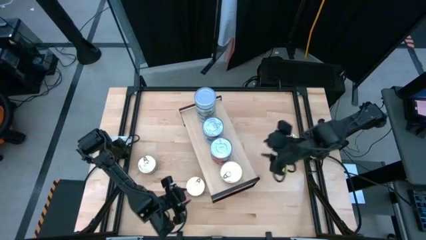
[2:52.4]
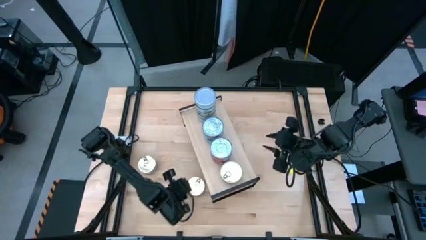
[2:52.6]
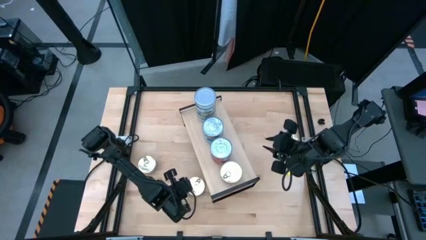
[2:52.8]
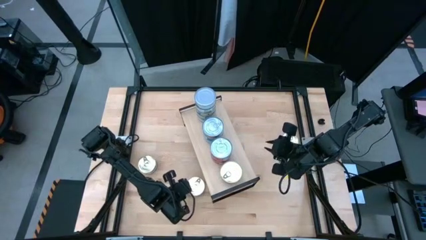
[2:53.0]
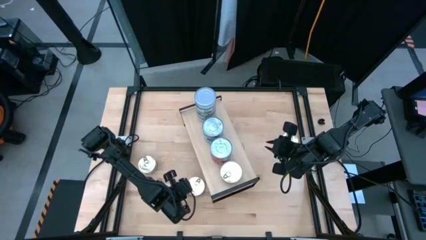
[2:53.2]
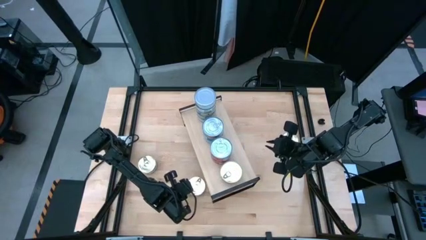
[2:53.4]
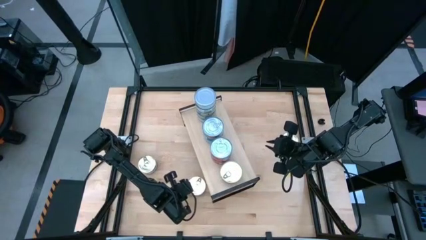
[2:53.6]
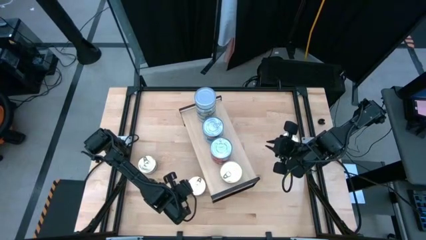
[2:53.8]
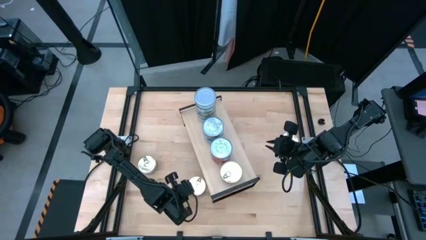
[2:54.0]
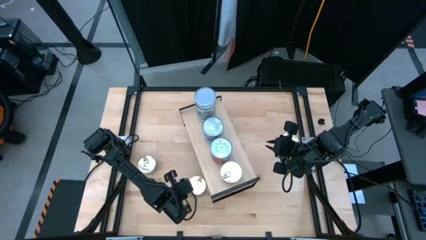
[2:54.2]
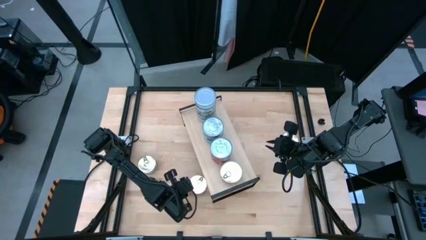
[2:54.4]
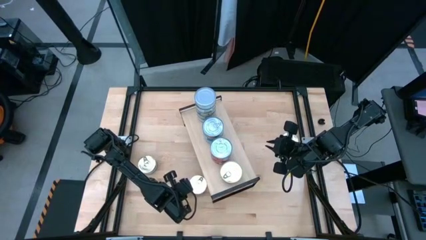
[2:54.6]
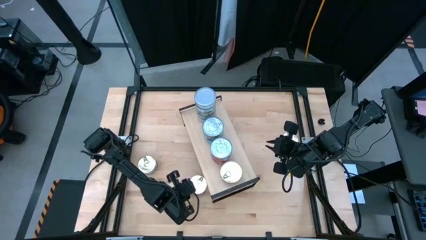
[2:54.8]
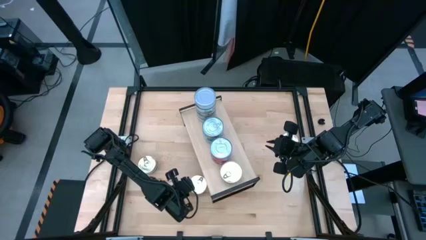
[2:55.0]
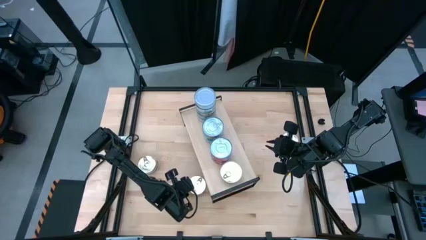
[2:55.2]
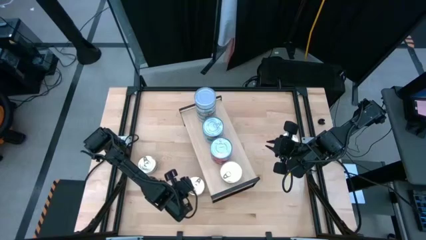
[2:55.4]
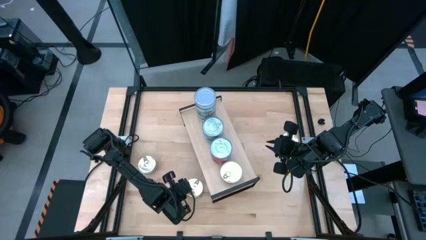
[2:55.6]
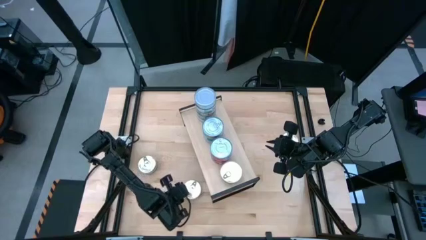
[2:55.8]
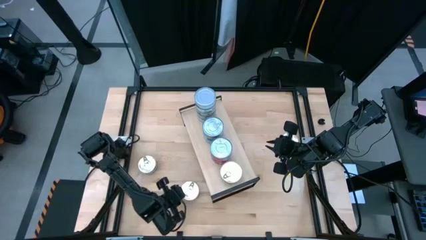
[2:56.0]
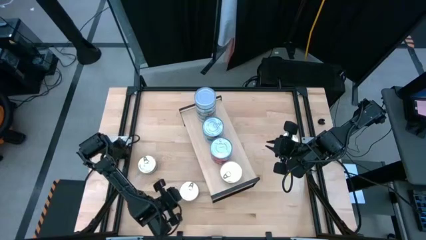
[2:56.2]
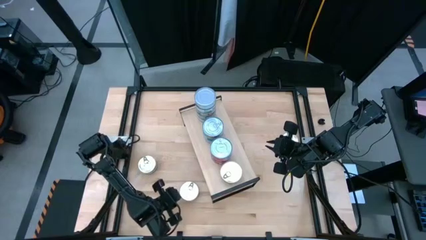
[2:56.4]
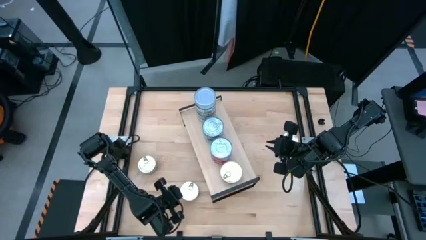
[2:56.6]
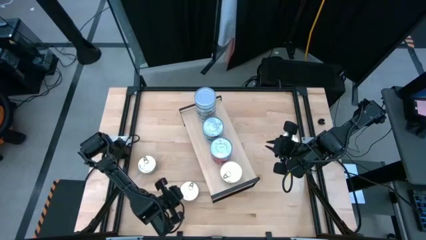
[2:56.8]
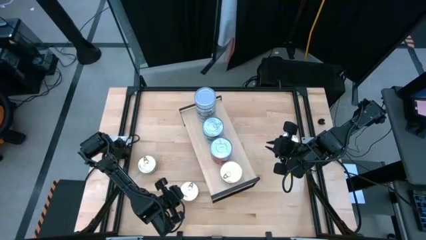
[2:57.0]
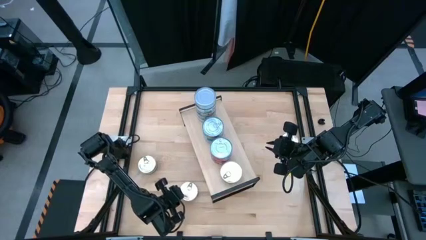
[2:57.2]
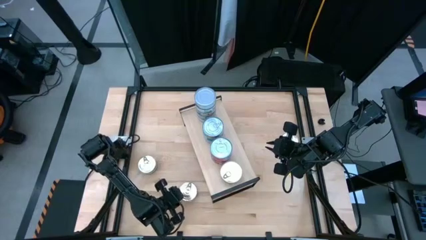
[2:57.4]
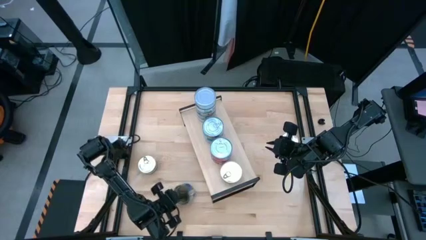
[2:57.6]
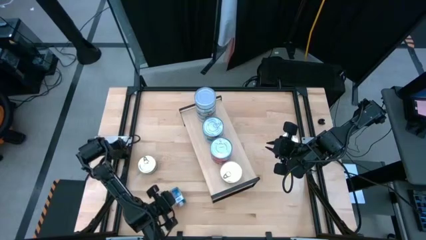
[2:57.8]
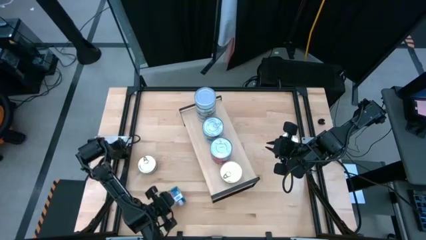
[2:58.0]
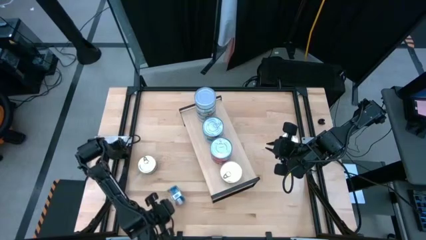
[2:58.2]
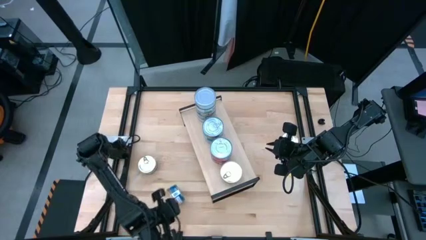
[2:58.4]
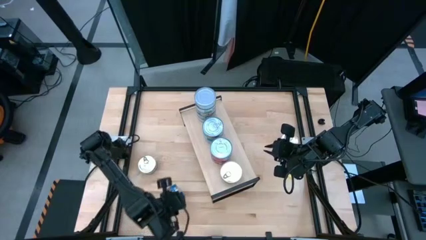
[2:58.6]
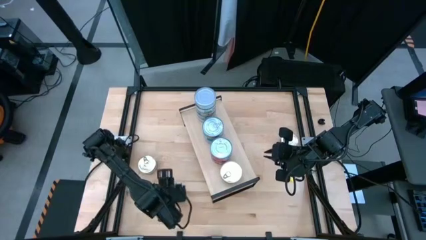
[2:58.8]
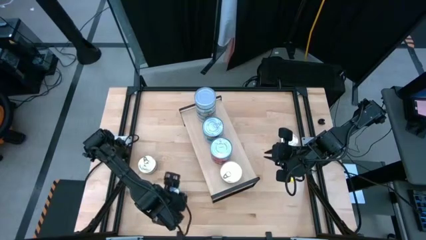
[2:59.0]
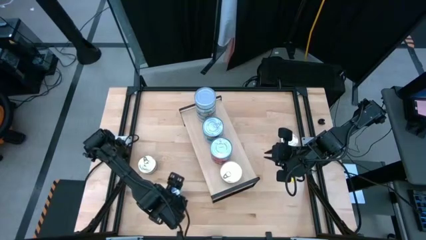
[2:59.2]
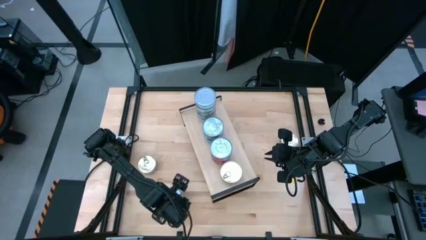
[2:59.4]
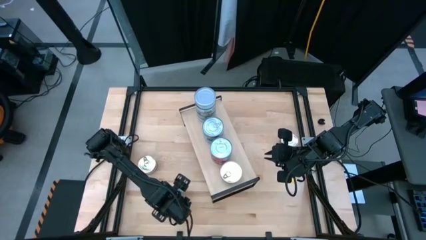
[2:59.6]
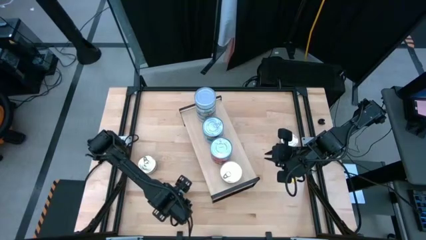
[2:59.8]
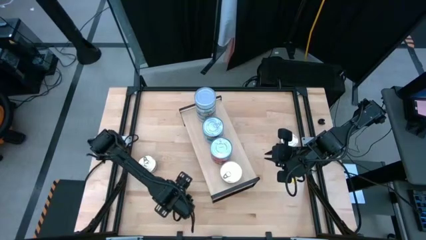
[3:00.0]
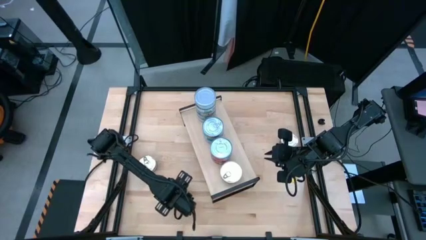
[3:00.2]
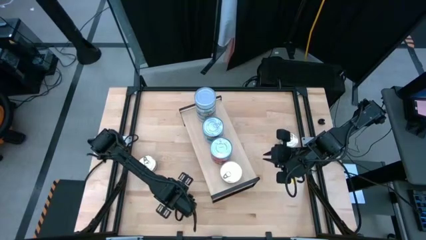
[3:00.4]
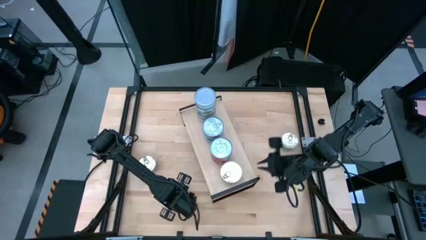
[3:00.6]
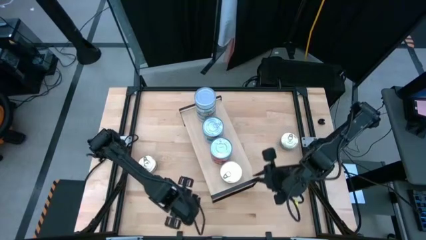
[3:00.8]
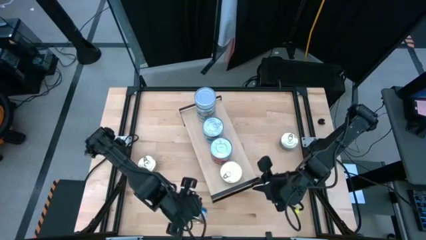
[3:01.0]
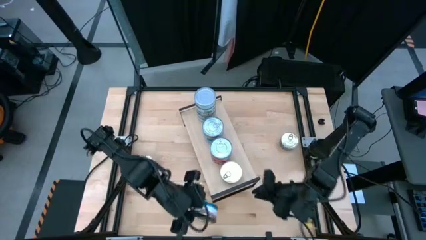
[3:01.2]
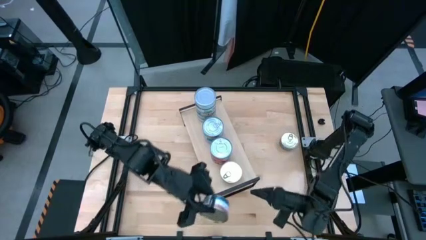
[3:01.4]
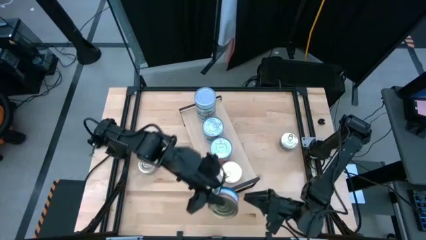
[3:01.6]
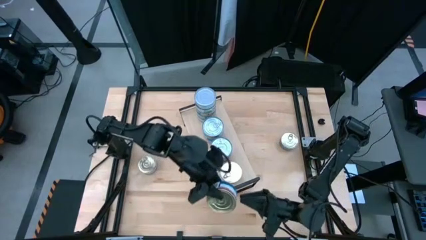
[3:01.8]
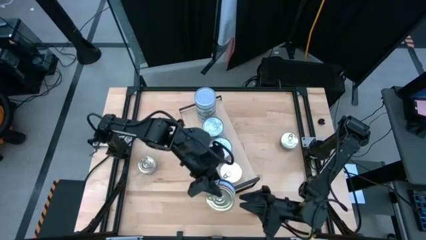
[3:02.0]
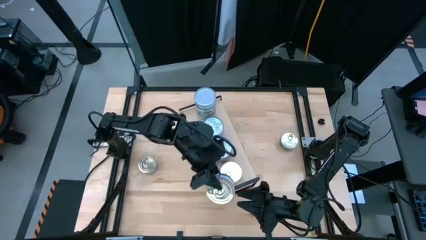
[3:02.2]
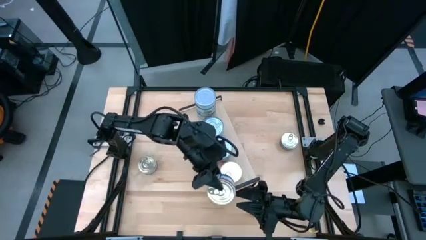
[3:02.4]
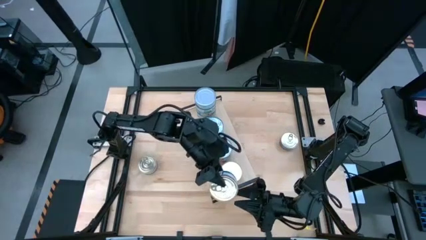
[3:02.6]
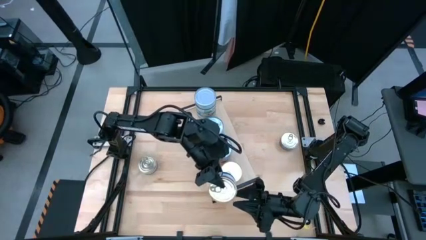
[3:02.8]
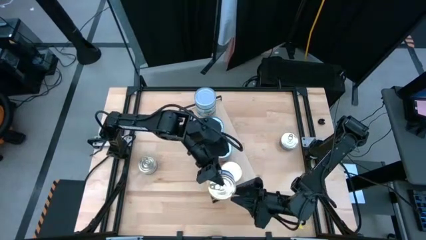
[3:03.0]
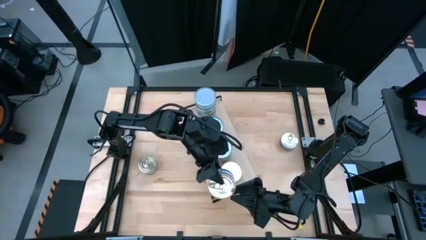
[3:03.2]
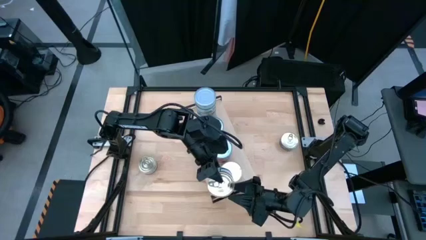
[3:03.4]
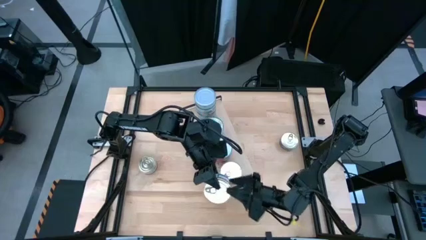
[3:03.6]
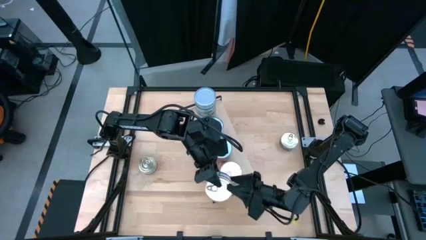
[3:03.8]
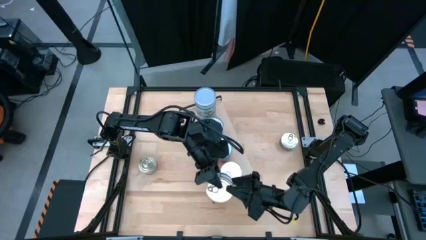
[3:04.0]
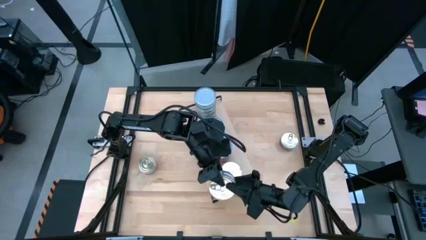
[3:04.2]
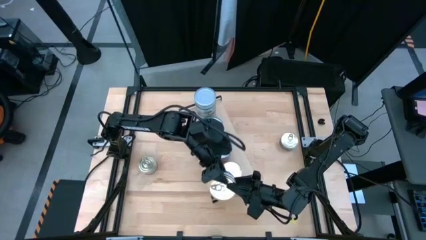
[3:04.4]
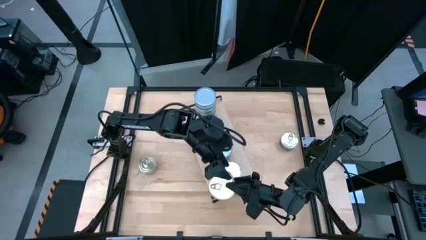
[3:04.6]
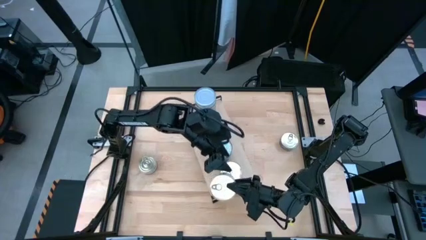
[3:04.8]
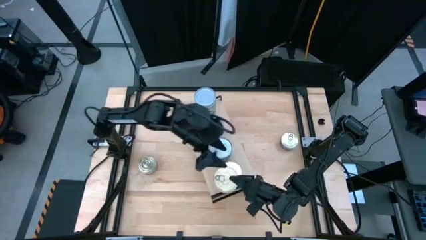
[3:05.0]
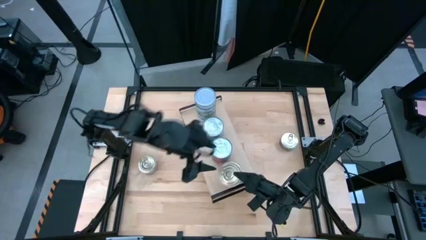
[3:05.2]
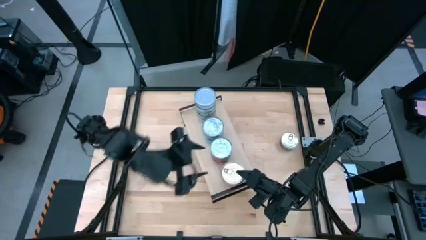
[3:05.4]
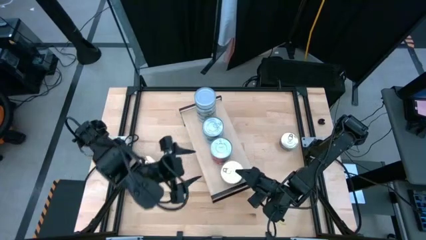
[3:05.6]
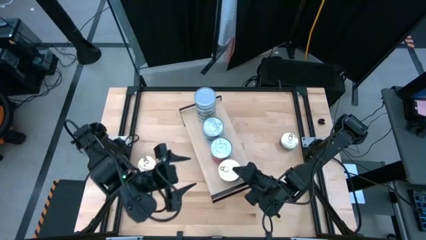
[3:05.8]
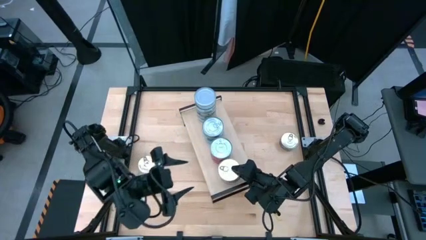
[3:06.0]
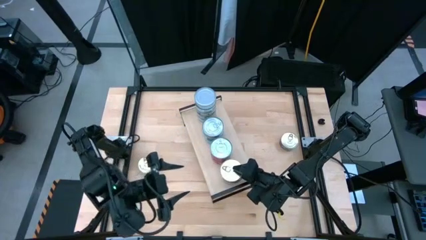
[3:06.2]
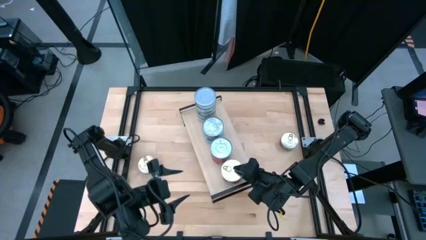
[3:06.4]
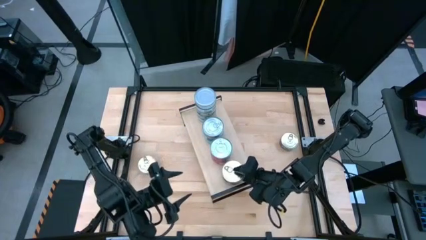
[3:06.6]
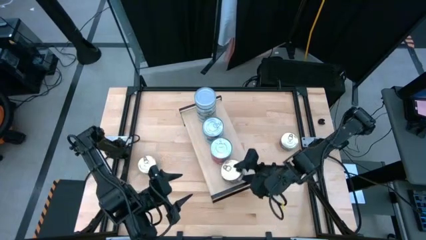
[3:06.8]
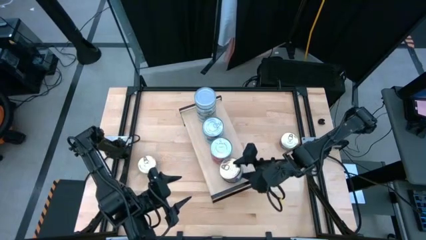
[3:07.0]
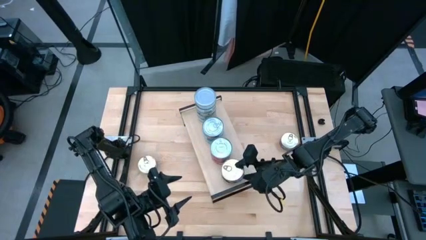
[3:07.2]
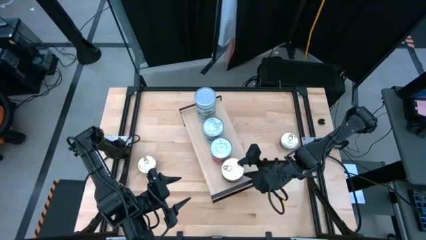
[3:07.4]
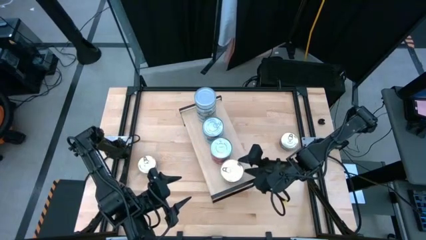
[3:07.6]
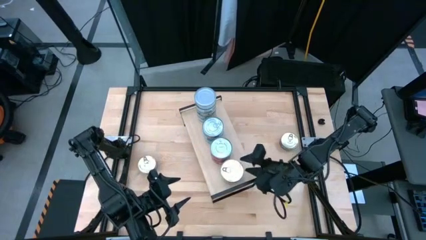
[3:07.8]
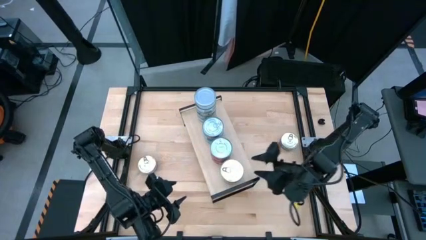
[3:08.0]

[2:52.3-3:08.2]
Task: Stack canned seafood by type on shelf
Stack the bottom right blue and pink tuna can on top of the other blue and pink tuna can on the shelf
